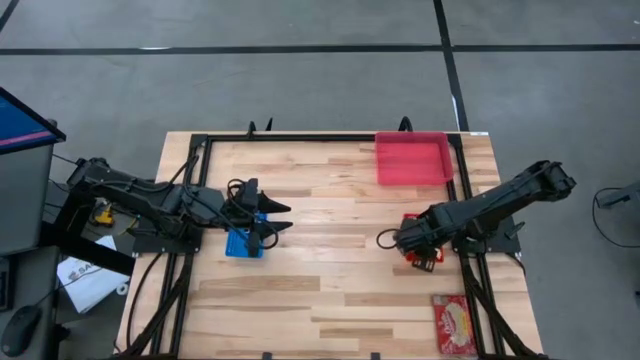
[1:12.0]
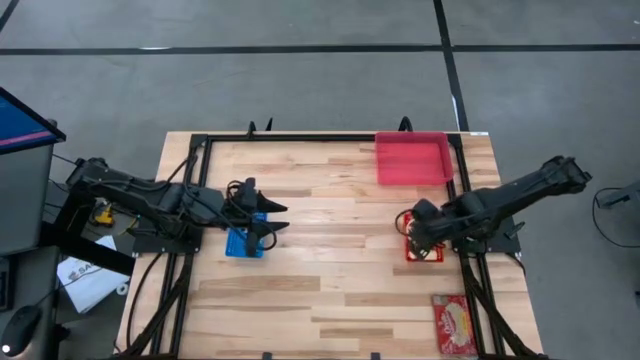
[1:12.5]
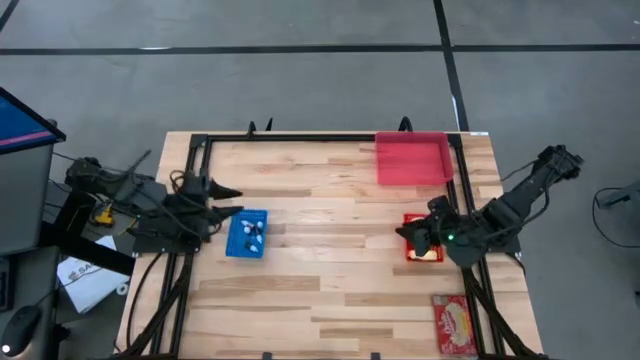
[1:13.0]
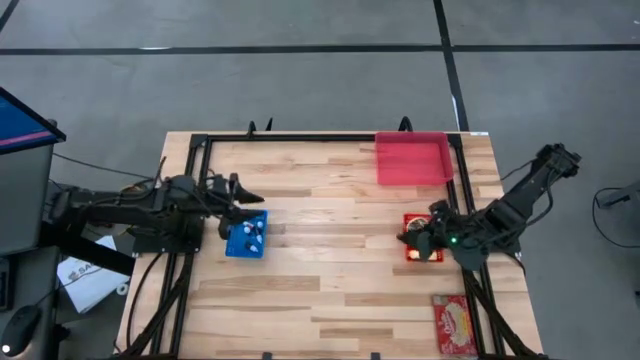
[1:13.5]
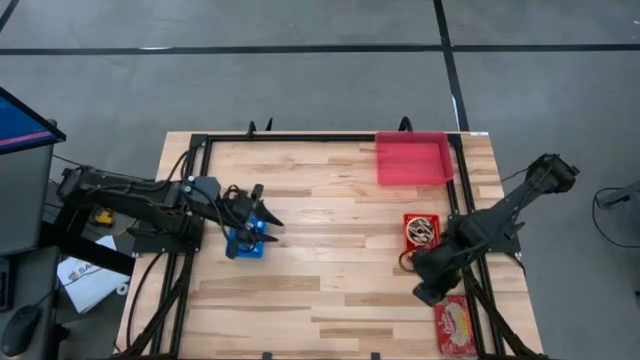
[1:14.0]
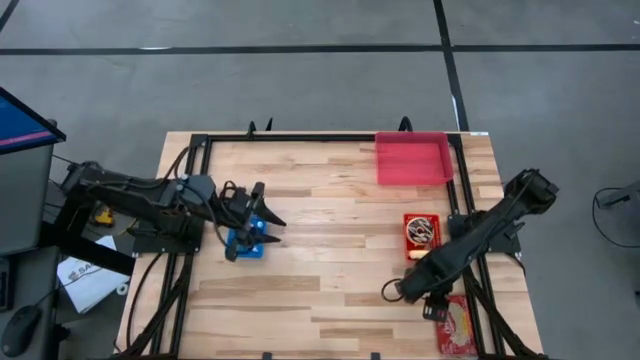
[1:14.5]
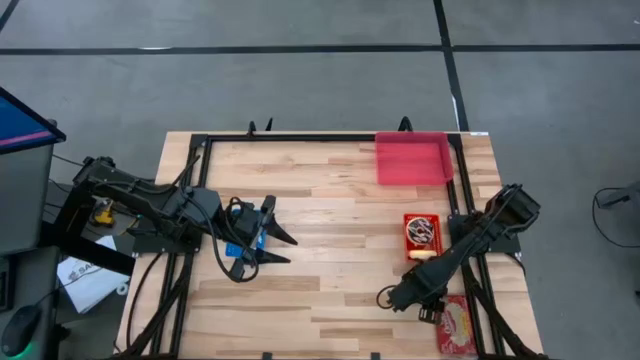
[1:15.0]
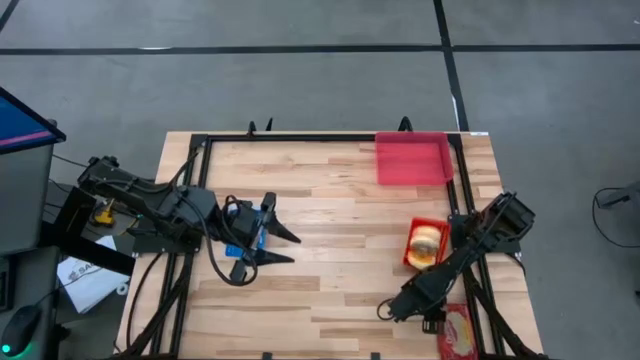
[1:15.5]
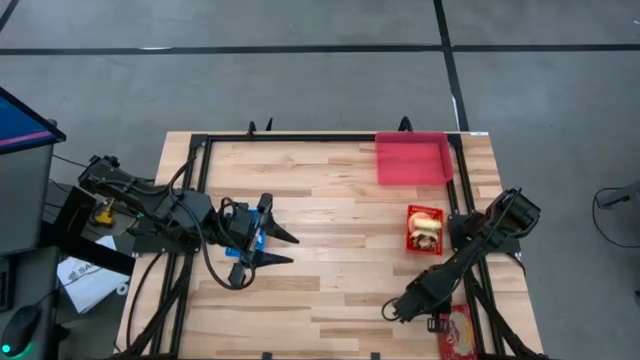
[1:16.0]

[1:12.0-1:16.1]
Put the red popcorn bag into the pink bin

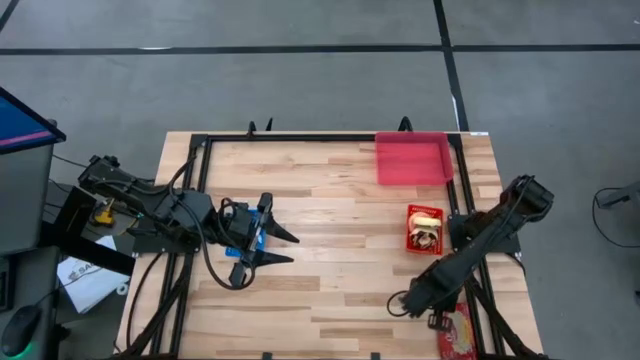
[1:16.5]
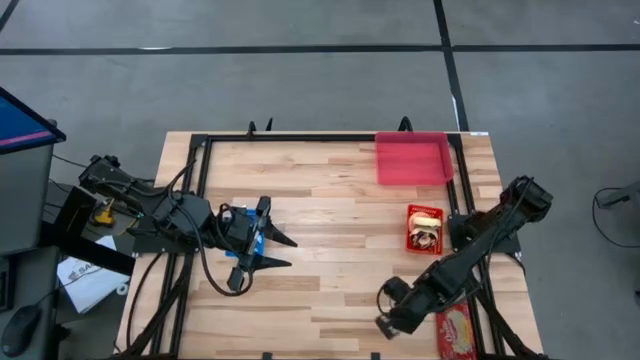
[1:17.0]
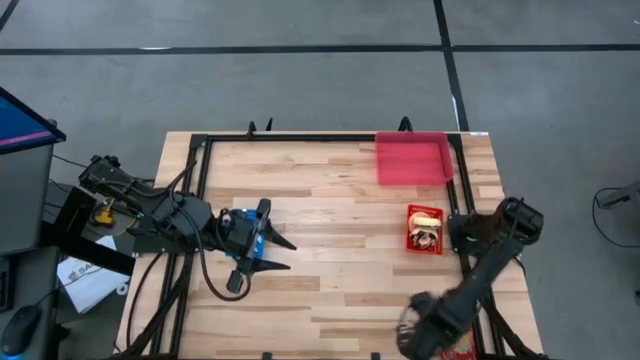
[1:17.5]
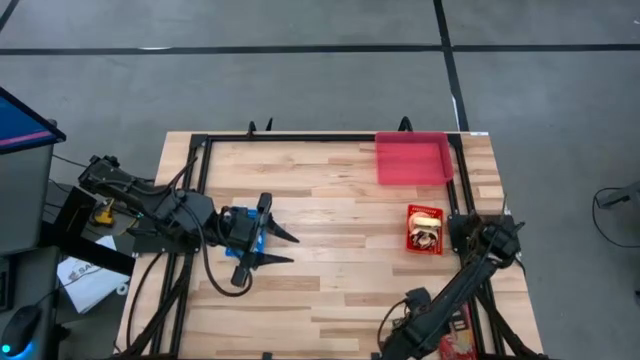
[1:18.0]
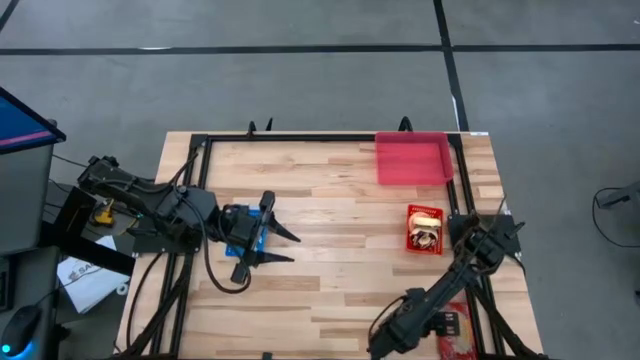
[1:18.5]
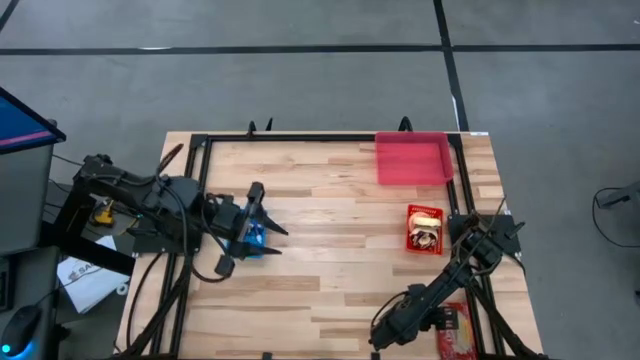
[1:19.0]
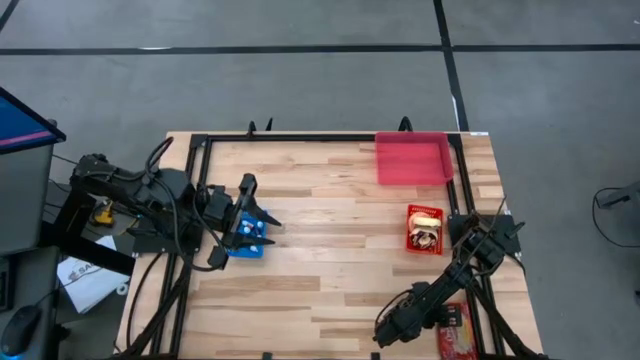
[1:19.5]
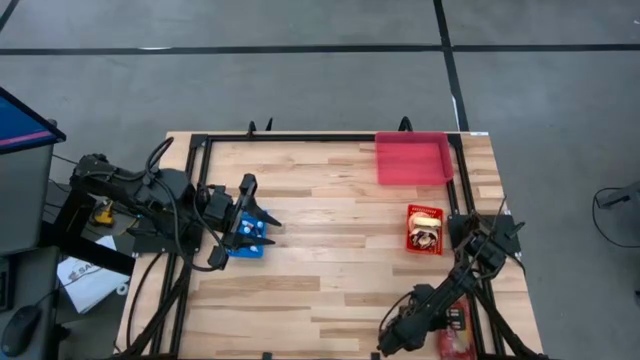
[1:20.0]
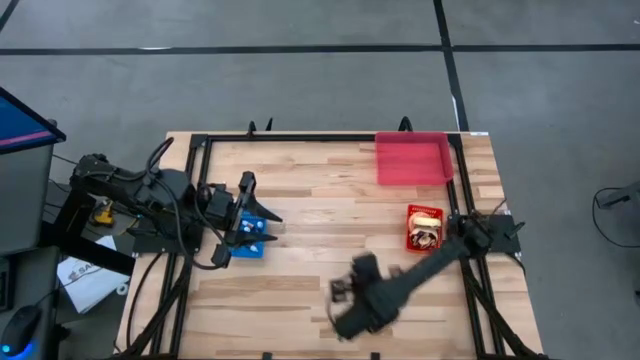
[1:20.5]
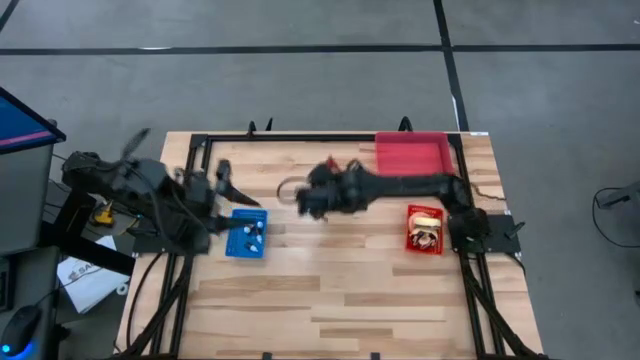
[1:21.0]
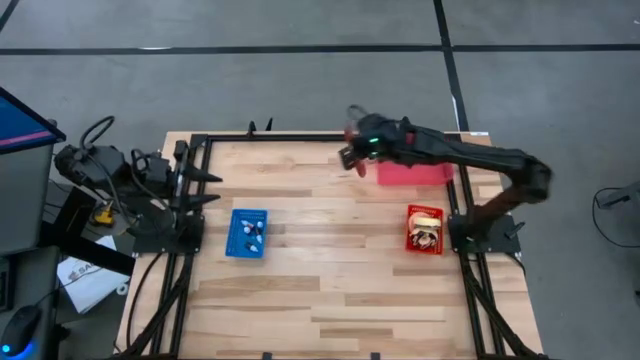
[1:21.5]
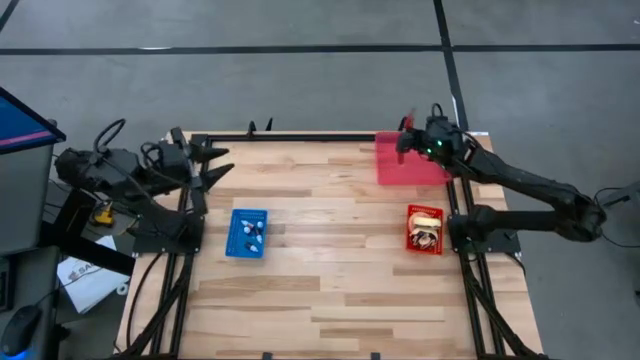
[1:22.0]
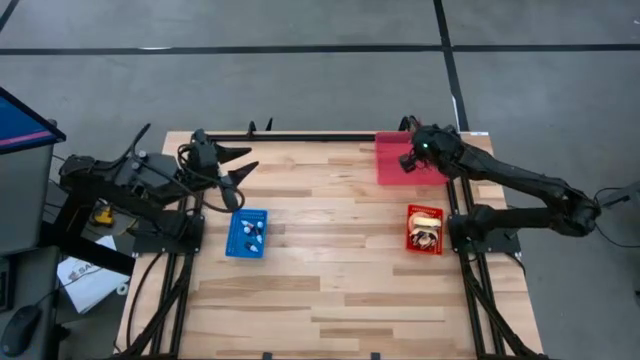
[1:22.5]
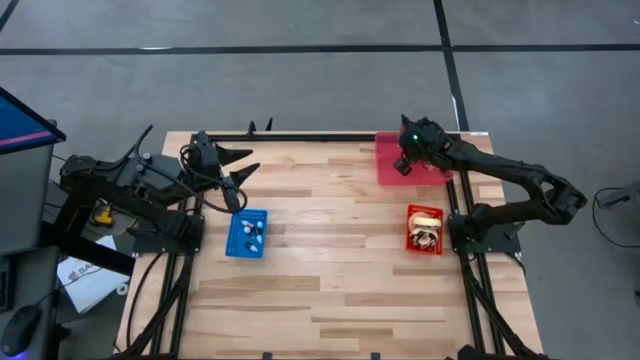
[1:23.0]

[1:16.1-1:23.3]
Put the red popcorn bag into the pink bin

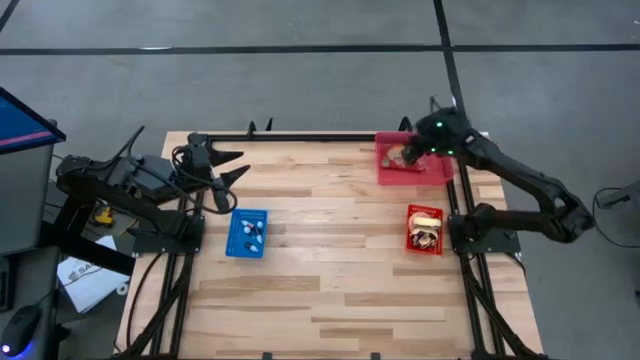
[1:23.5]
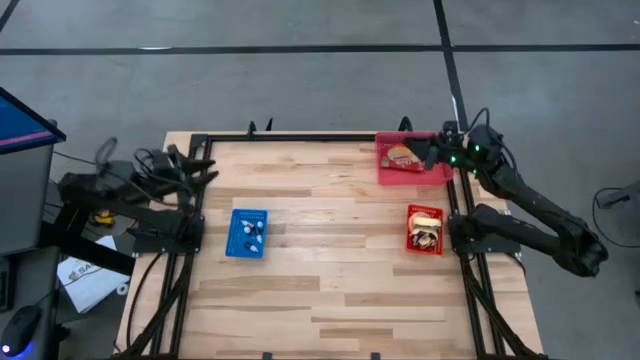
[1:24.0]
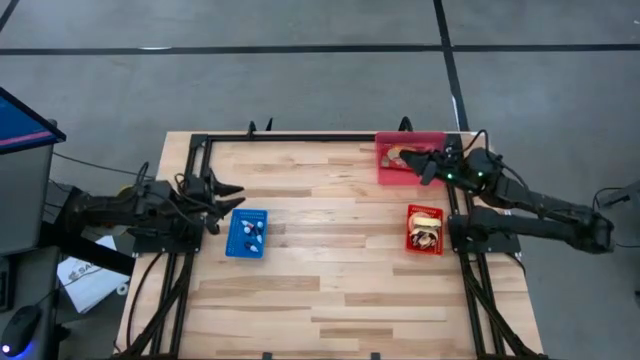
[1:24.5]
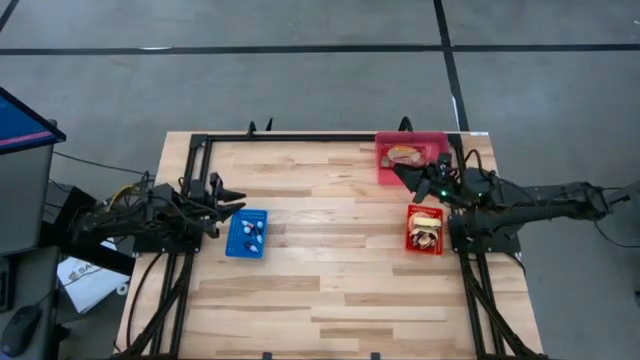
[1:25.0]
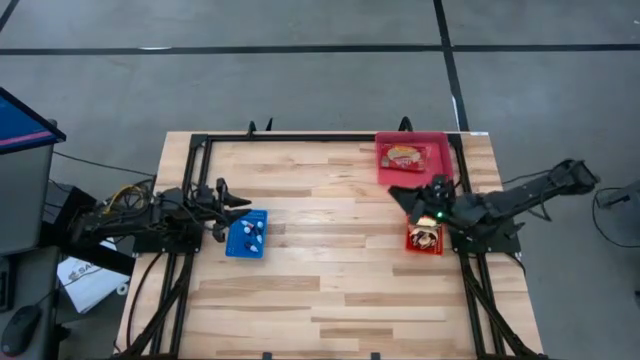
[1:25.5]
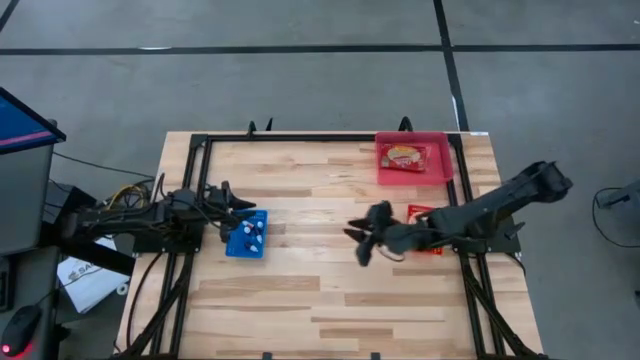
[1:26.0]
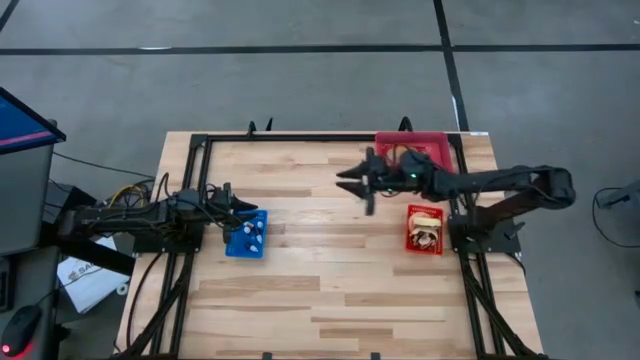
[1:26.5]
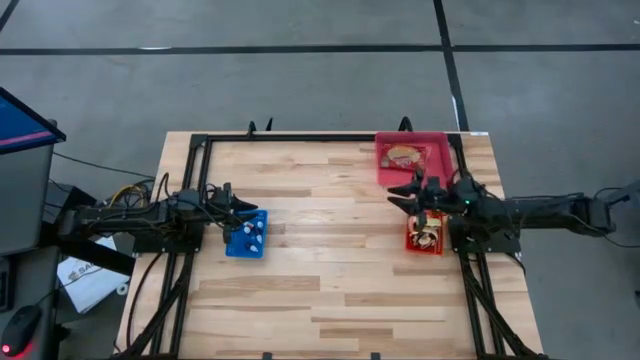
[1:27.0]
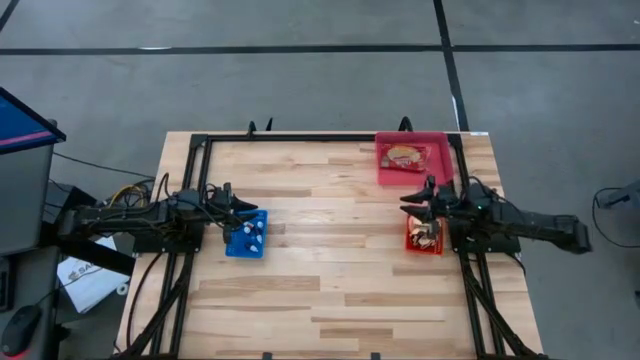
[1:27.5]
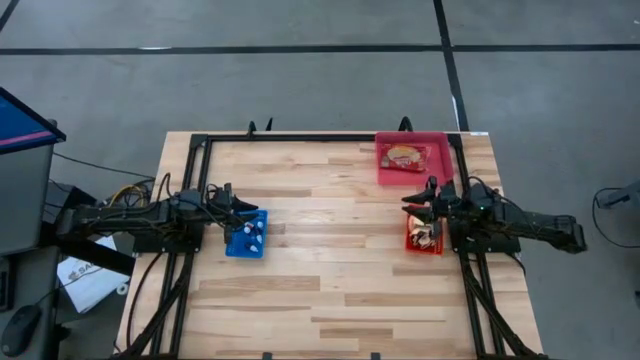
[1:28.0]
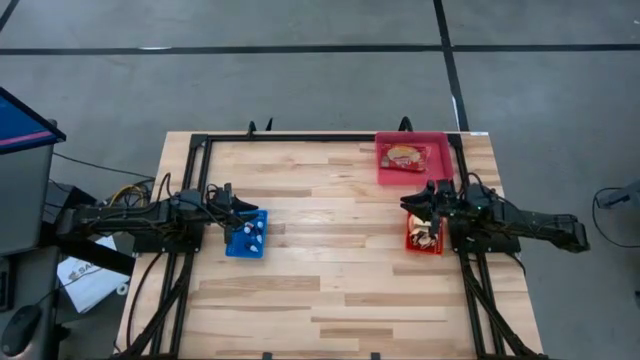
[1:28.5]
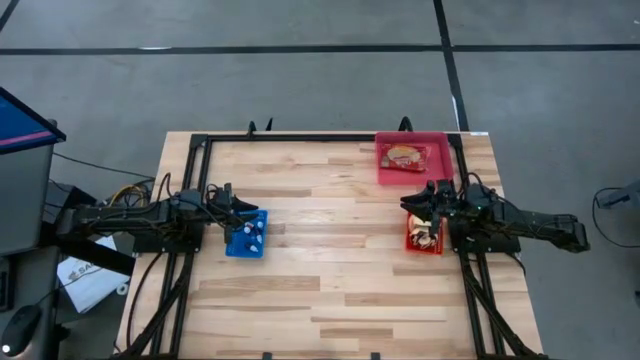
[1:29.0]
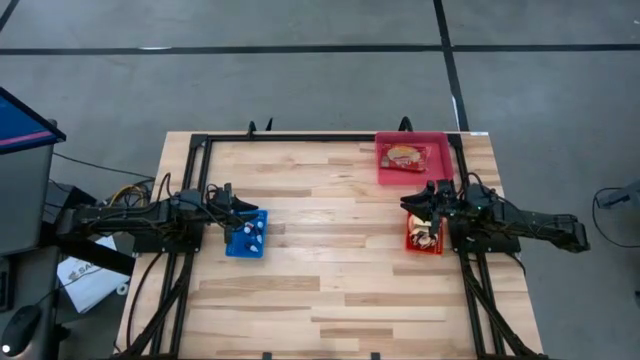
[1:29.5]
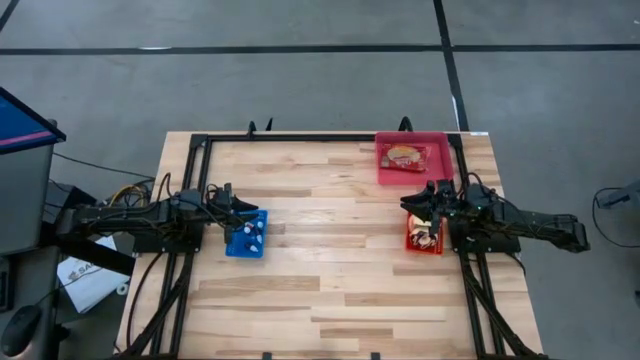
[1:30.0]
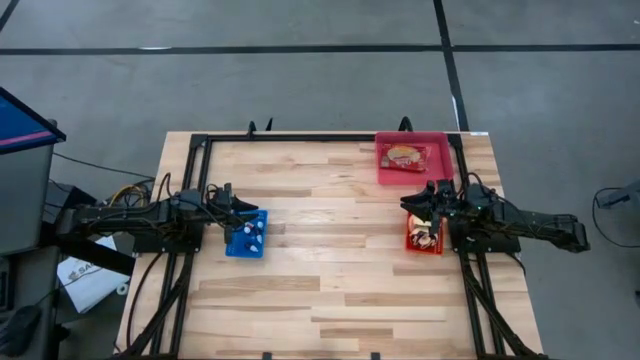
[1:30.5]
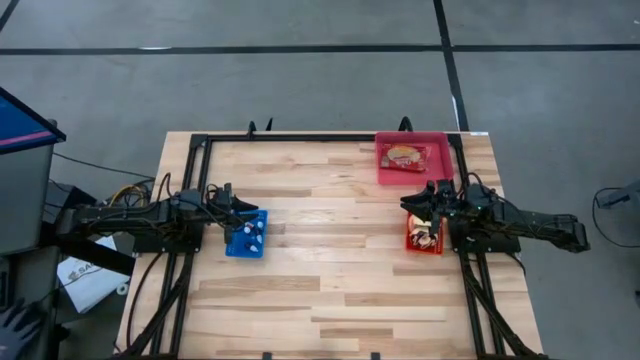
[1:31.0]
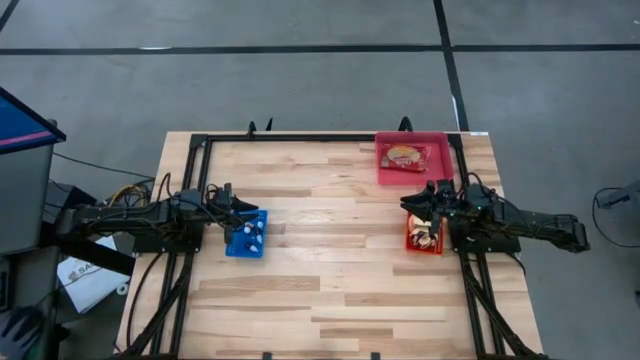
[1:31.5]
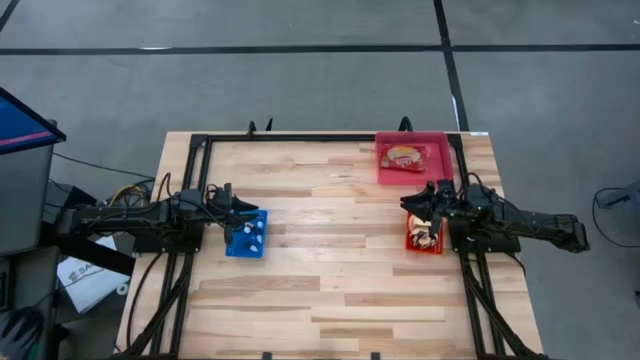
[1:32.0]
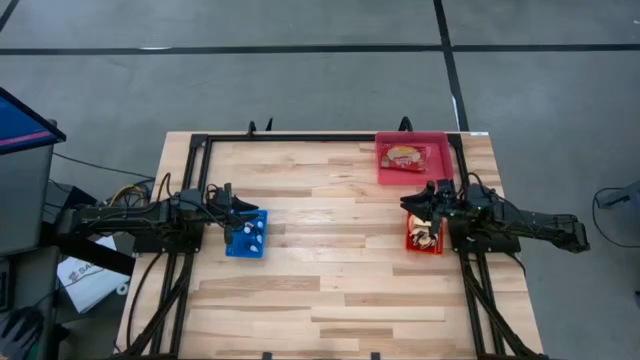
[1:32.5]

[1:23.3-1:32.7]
Return to Home Position
